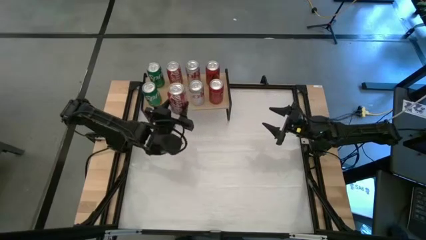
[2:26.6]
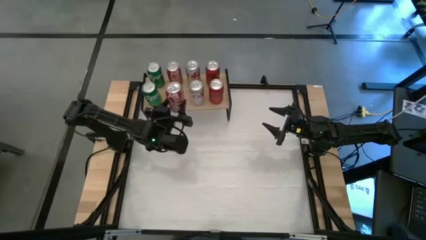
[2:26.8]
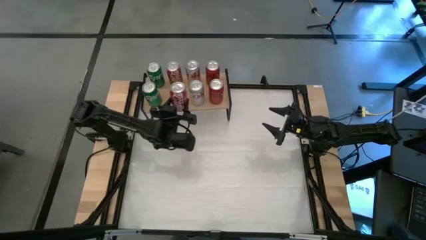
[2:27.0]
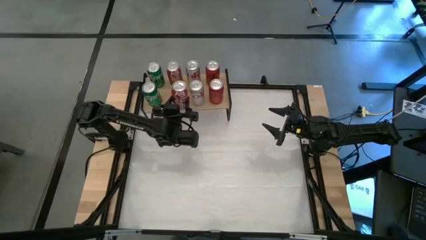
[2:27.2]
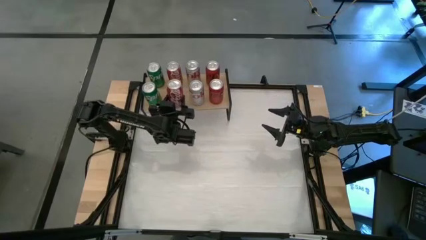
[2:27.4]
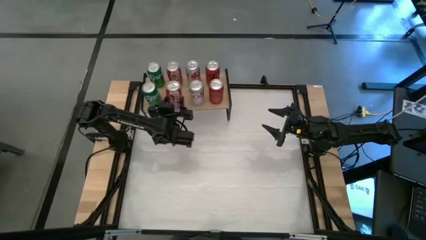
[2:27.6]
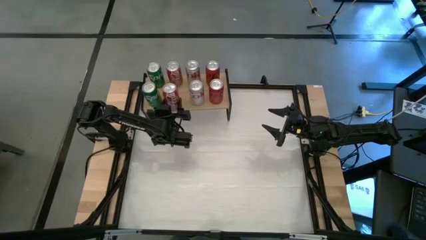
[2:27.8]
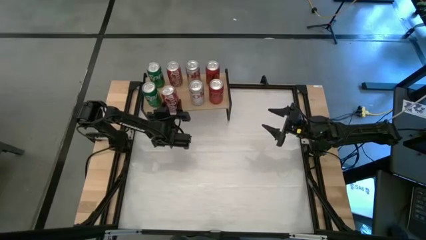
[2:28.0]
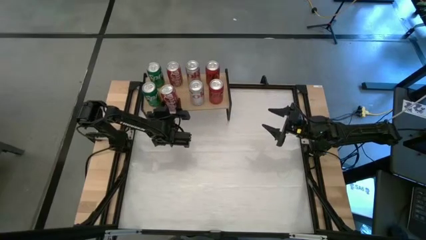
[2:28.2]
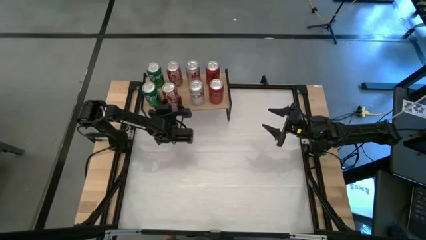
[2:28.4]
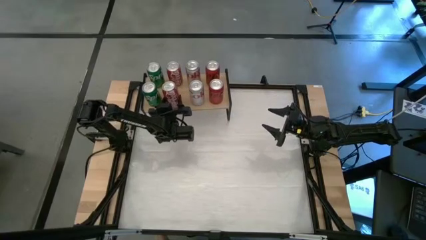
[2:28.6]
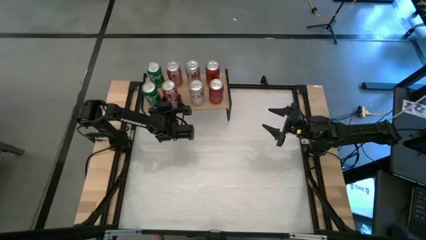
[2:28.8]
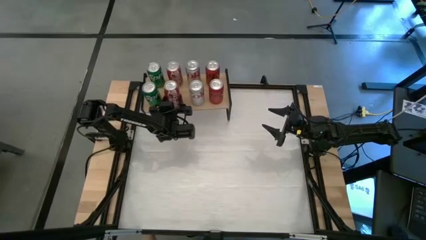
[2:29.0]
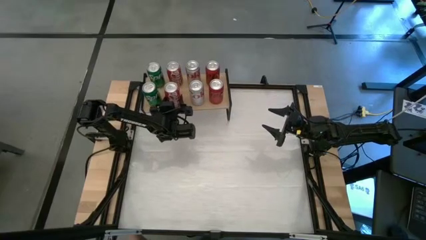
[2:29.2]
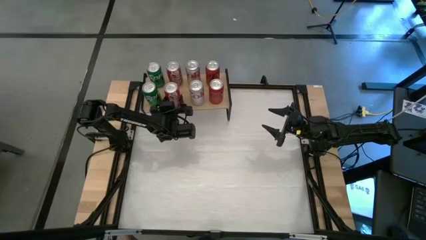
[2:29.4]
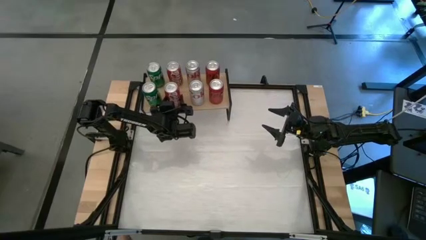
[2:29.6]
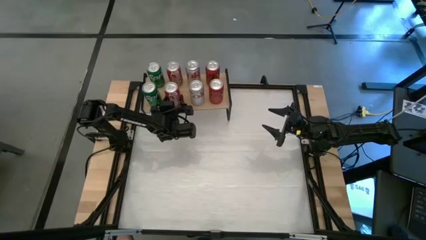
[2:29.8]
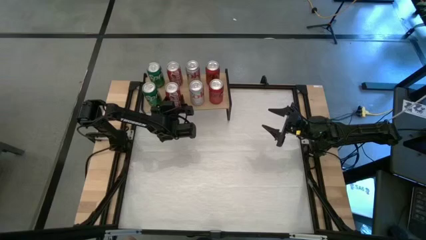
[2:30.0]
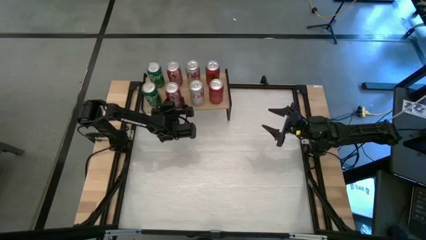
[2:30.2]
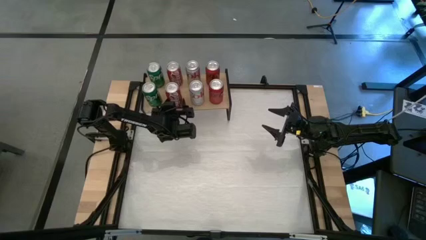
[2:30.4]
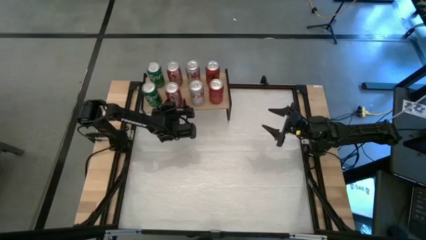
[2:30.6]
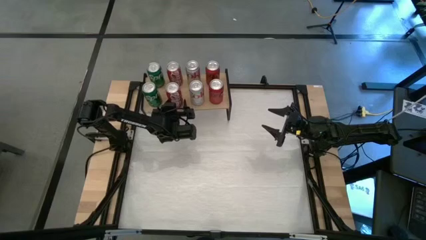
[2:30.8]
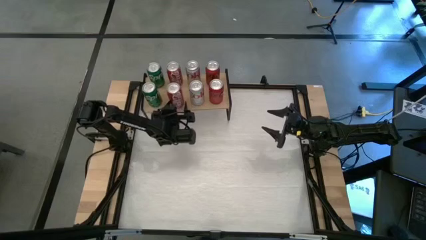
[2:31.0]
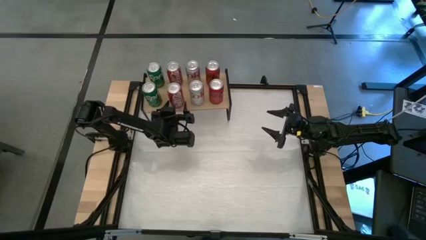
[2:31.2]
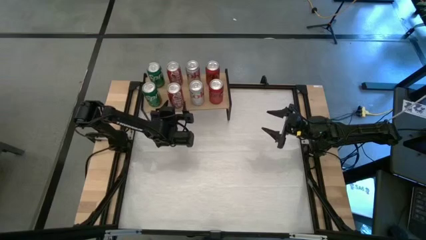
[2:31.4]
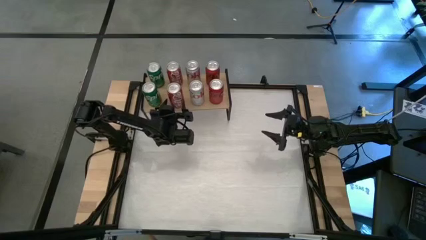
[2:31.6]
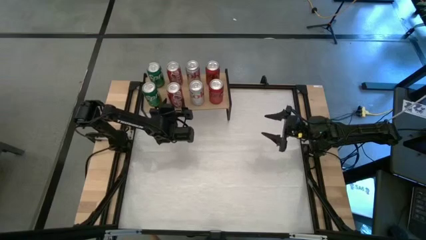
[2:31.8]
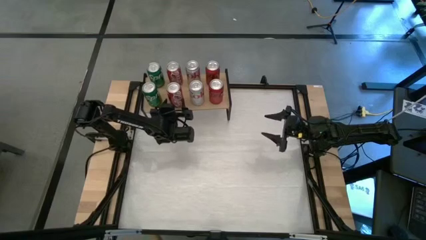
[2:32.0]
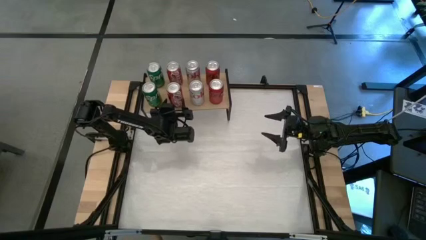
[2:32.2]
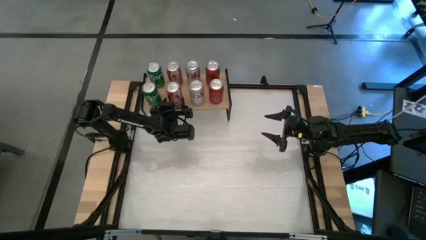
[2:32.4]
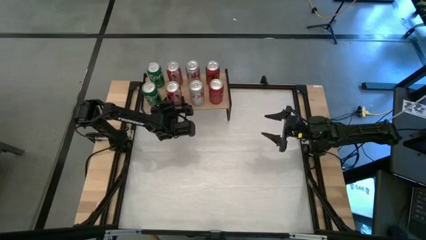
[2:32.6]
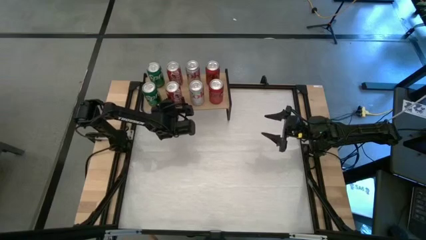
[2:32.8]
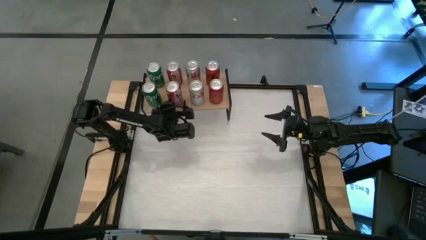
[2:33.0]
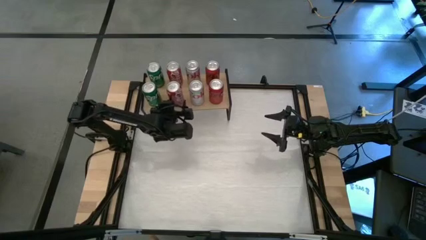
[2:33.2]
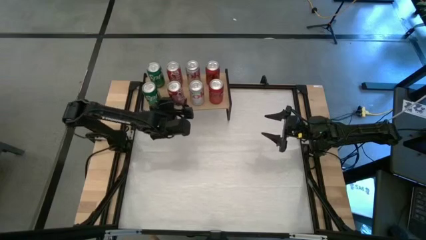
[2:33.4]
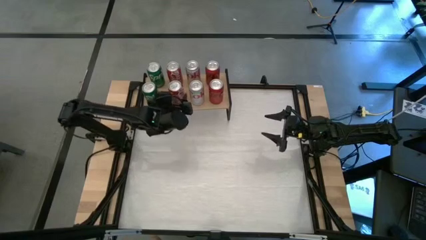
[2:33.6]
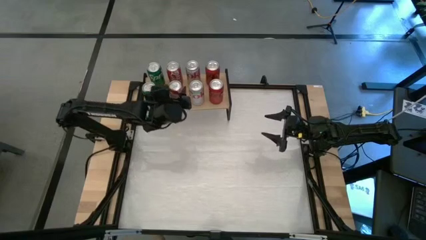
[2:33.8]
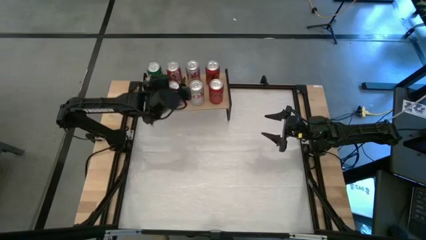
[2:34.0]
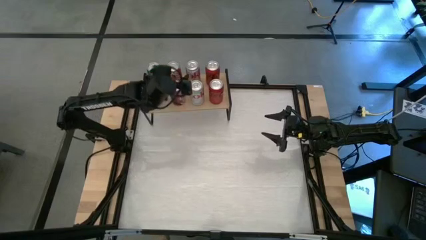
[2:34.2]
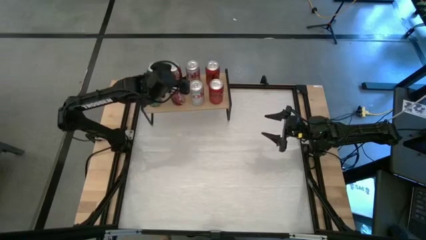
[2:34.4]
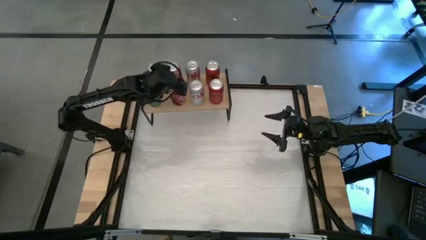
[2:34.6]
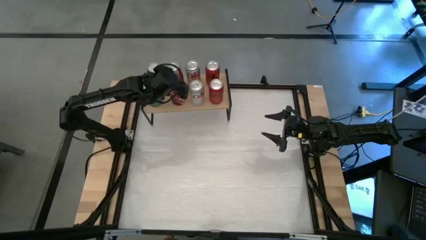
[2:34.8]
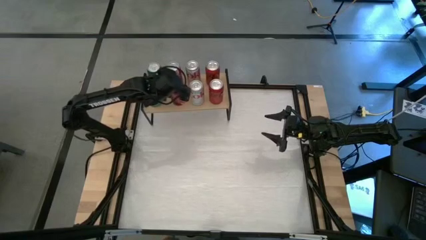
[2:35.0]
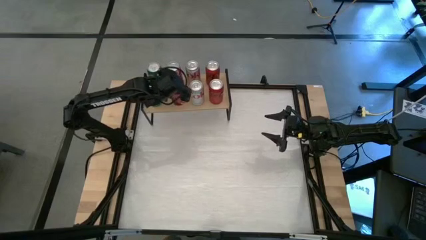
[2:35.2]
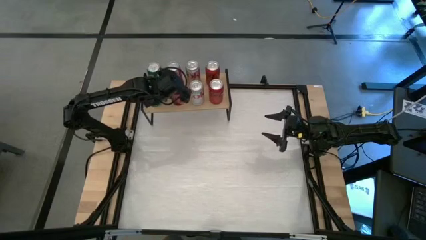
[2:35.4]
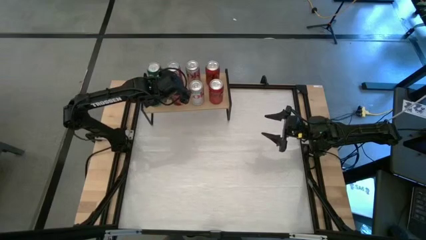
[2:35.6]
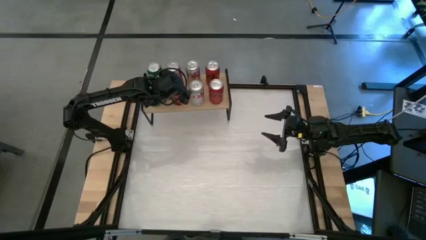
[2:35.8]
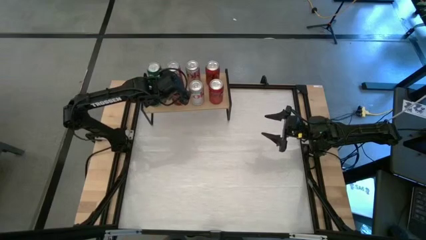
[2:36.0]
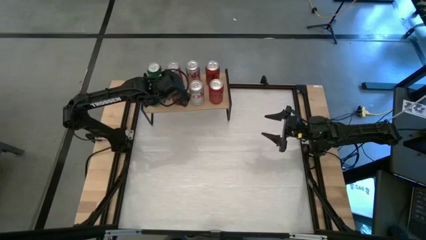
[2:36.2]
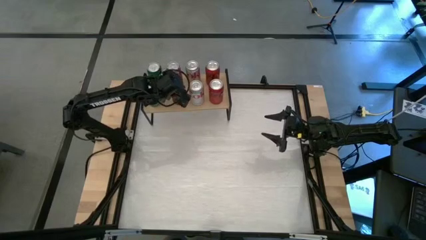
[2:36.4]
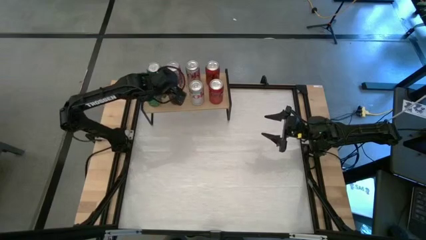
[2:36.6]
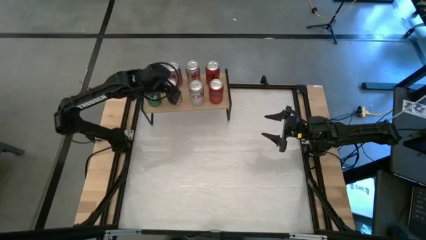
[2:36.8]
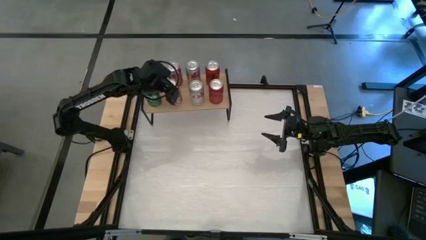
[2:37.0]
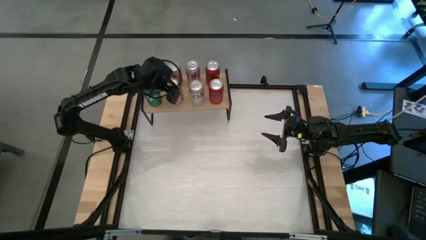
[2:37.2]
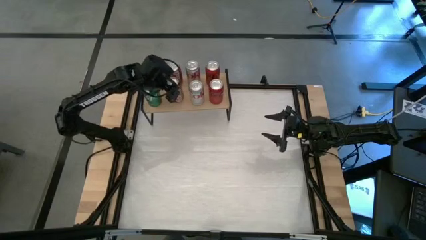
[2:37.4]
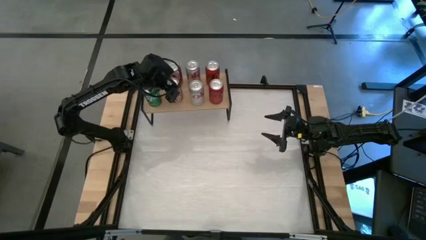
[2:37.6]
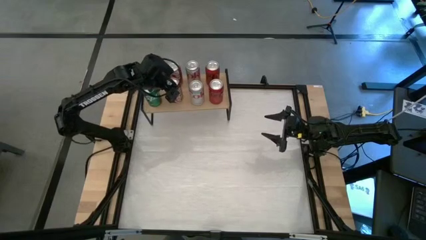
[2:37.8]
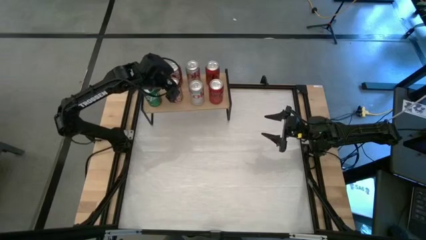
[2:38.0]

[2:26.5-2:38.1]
Task: Place canned beverage on shelf
Put the red white soda can on the shelf aligned with the other red white soda can
